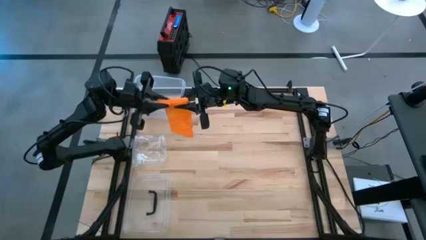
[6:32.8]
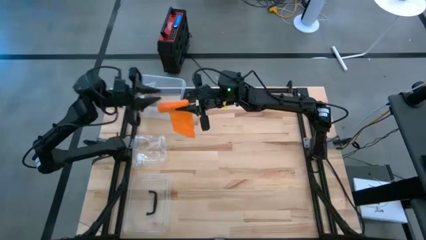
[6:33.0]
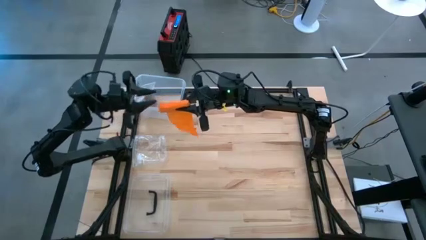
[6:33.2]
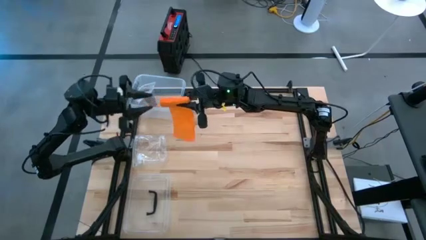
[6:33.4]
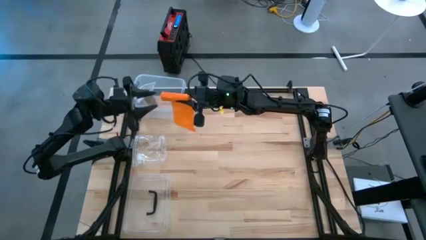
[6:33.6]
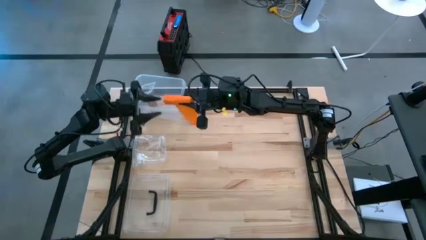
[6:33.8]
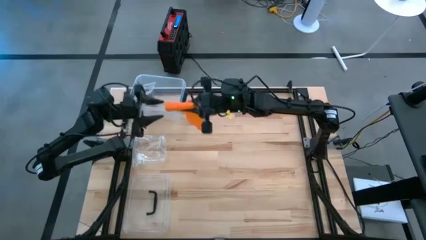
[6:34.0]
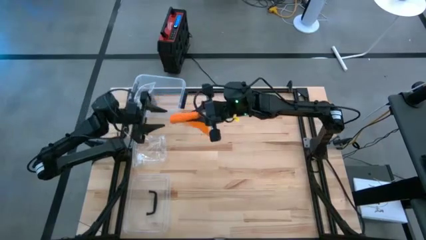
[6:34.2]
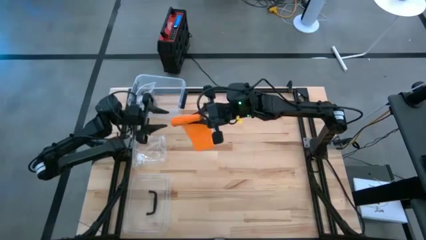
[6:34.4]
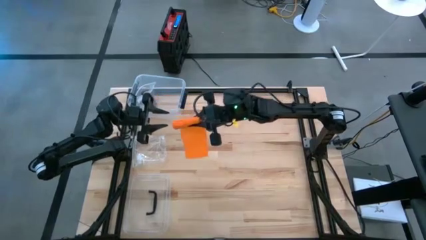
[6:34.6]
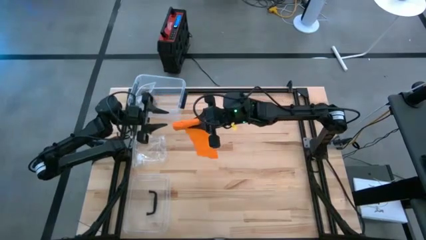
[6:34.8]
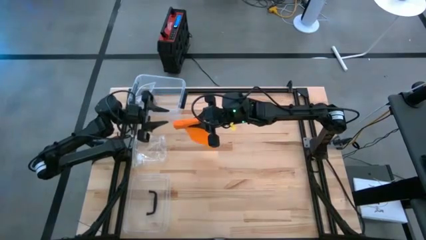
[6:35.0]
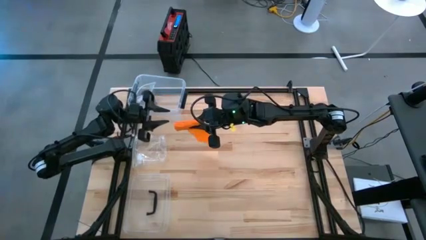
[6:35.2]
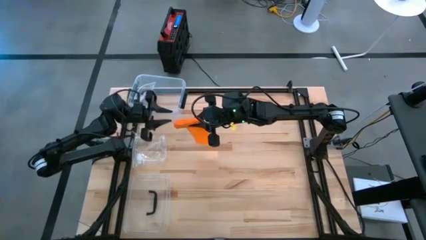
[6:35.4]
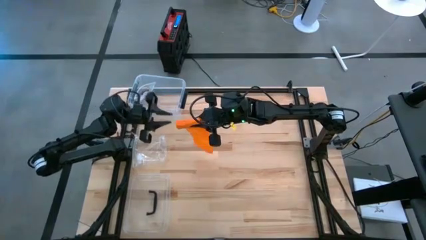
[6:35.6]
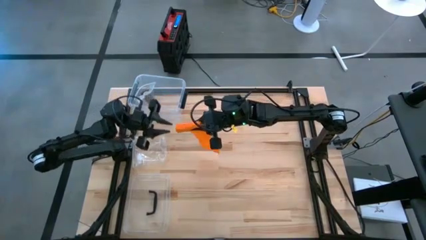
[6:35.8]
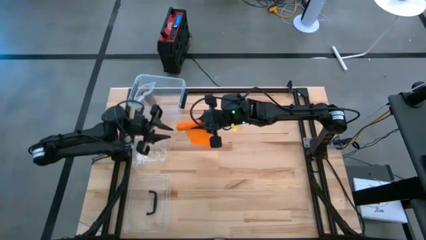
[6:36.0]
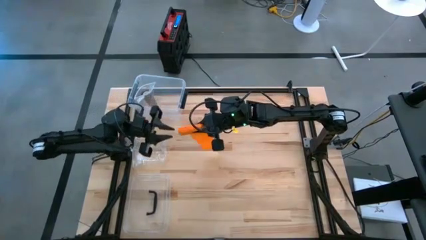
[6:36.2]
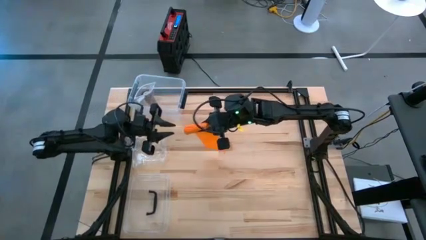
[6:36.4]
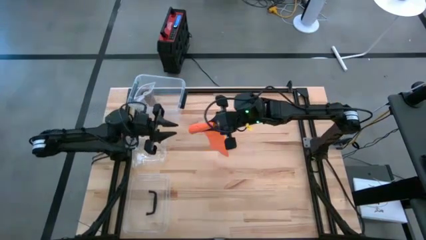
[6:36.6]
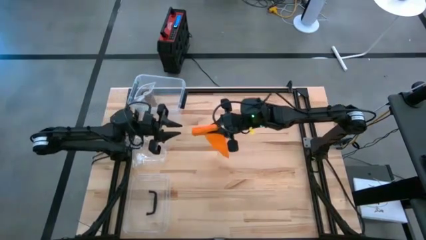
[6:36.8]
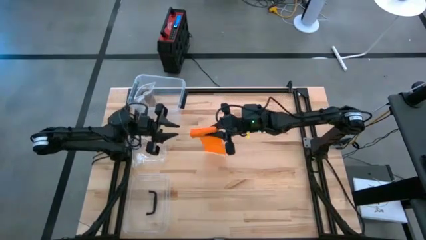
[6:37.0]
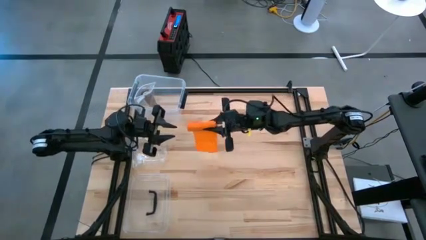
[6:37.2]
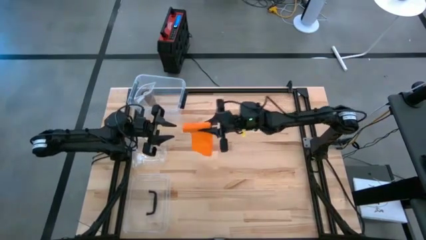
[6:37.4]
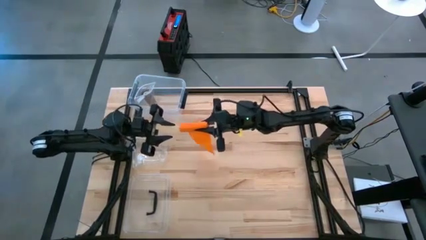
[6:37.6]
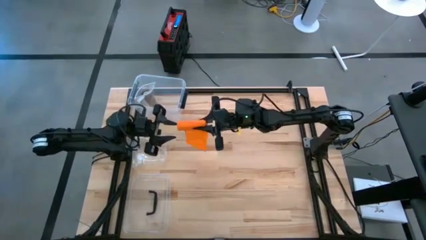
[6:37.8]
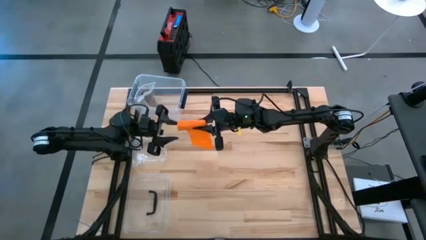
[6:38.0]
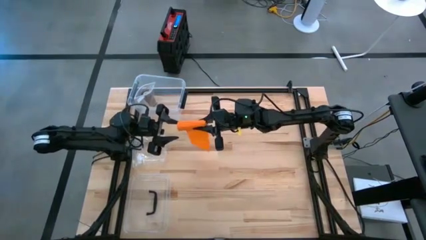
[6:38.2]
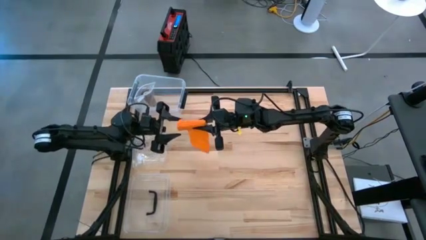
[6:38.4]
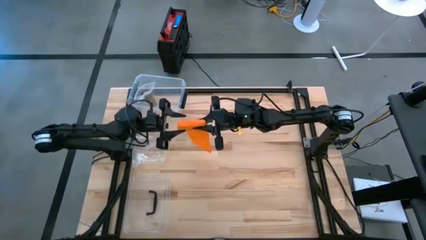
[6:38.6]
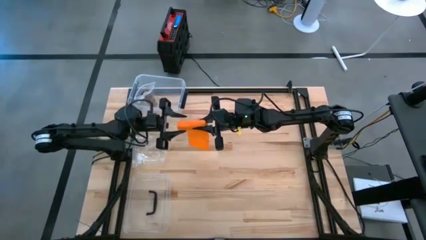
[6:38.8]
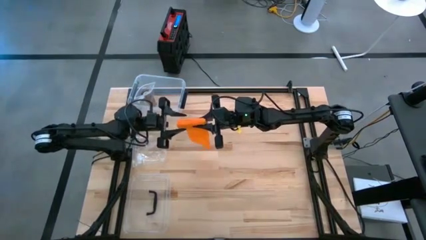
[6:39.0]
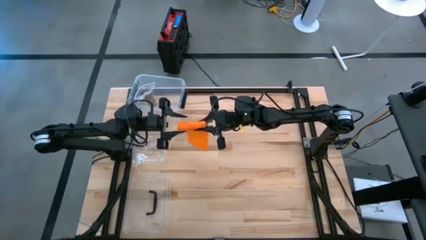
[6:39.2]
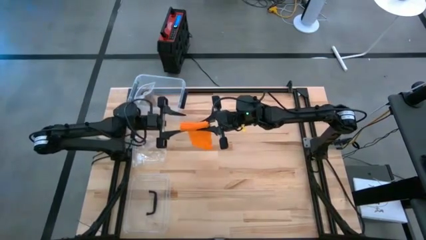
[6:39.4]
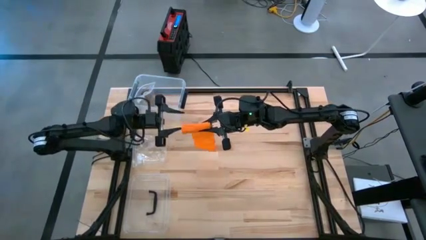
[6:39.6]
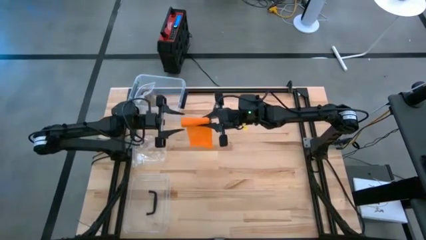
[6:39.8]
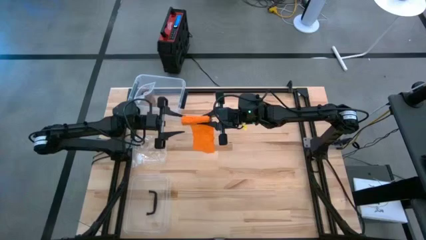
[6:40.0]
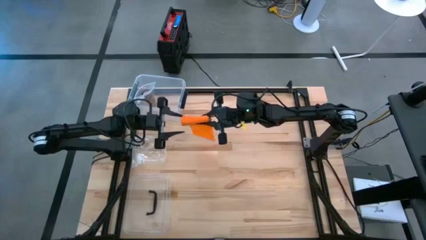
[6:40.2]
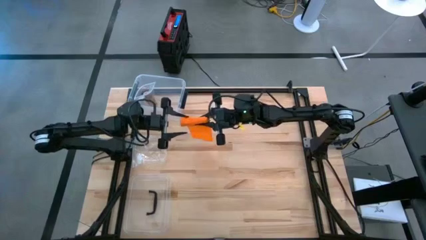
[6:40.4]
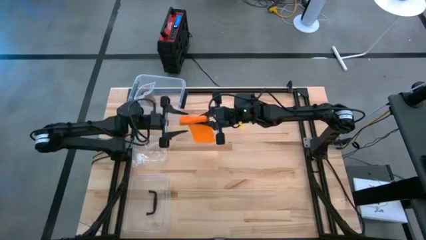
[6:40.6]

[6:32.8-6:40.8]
Task: Roll bandage
Roll the orange bandage

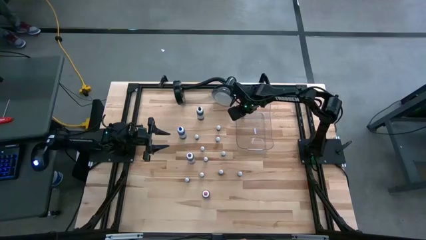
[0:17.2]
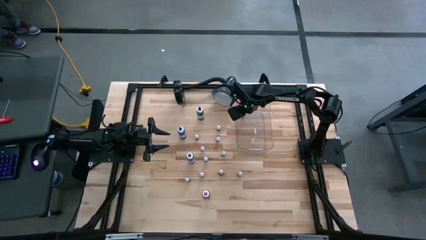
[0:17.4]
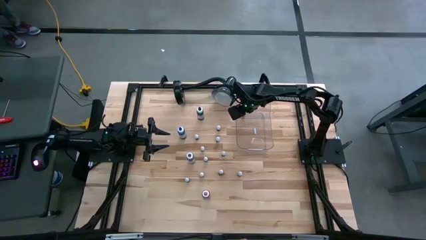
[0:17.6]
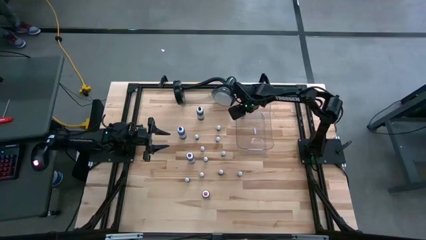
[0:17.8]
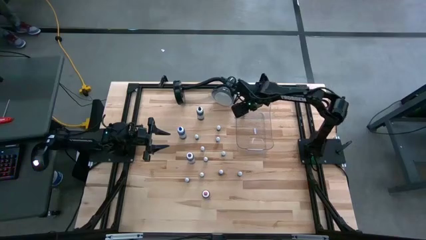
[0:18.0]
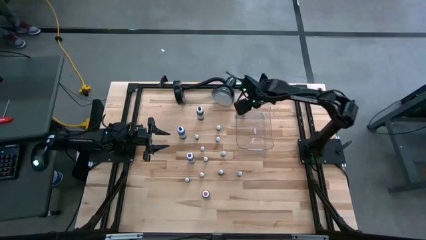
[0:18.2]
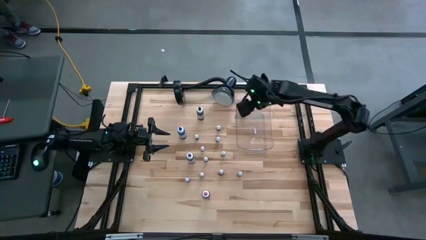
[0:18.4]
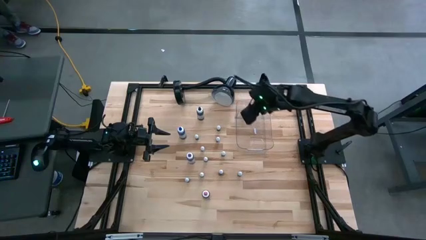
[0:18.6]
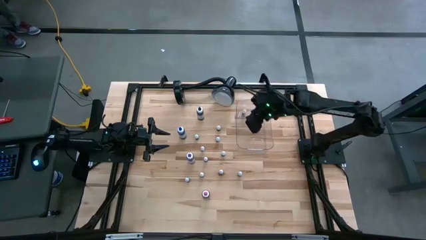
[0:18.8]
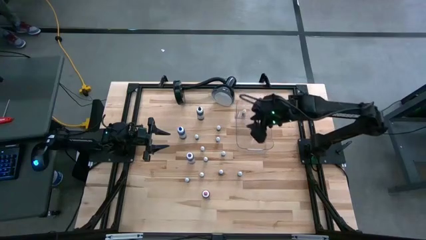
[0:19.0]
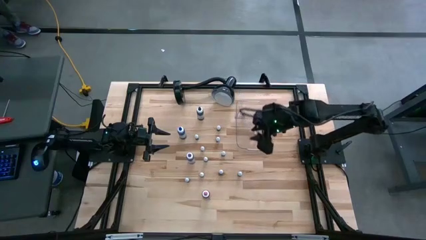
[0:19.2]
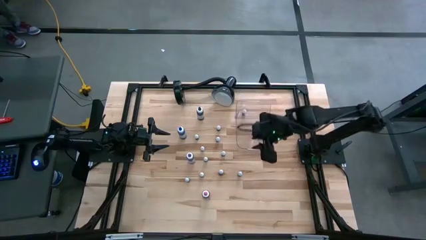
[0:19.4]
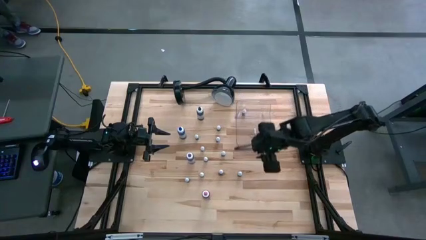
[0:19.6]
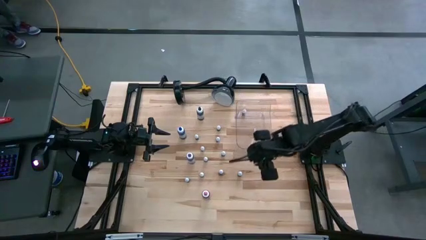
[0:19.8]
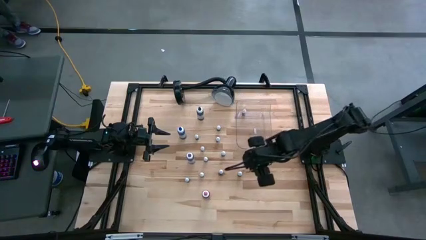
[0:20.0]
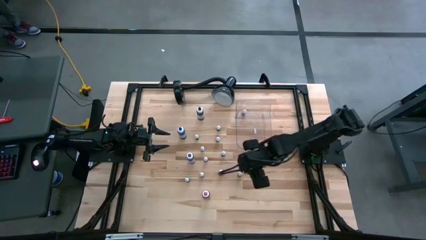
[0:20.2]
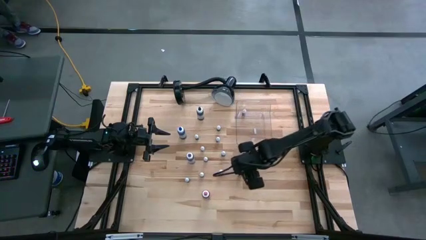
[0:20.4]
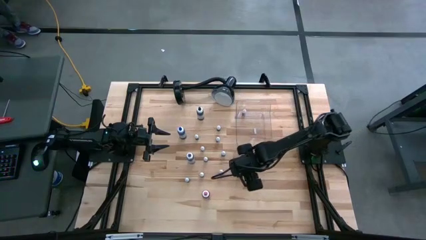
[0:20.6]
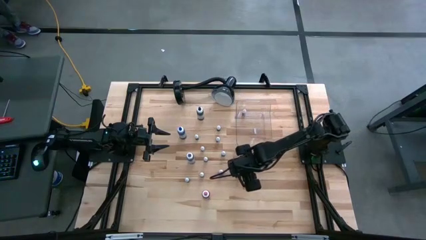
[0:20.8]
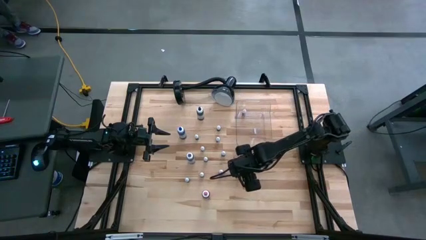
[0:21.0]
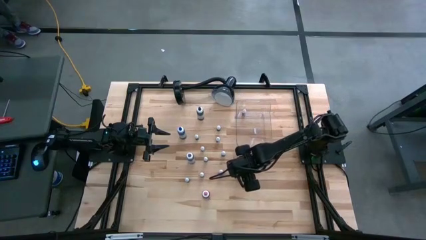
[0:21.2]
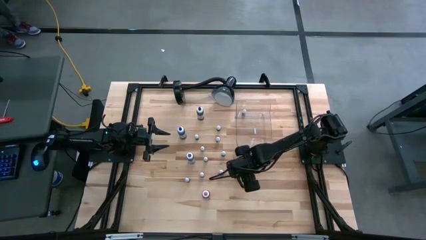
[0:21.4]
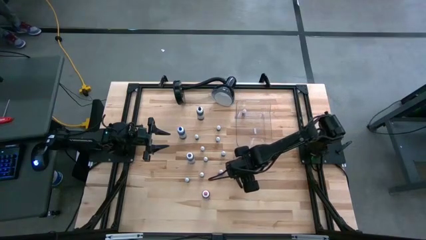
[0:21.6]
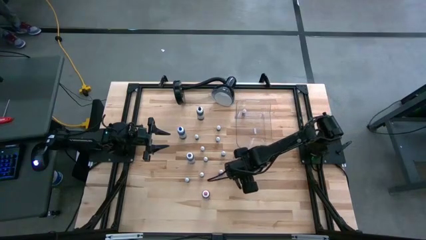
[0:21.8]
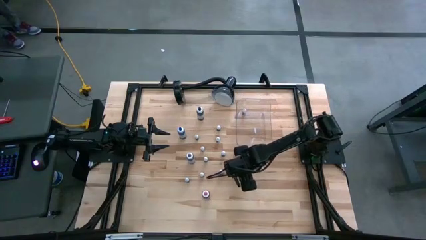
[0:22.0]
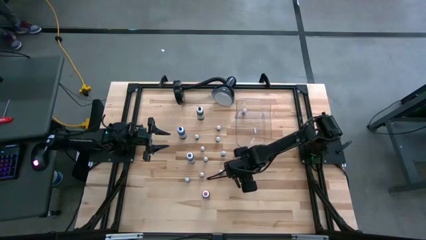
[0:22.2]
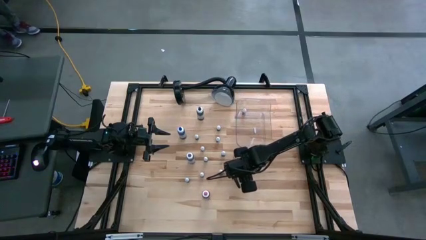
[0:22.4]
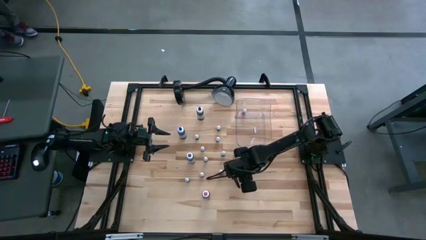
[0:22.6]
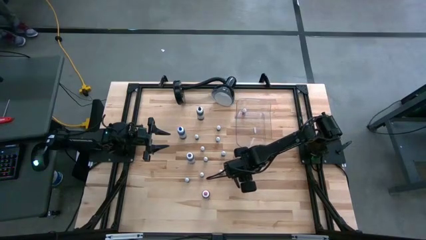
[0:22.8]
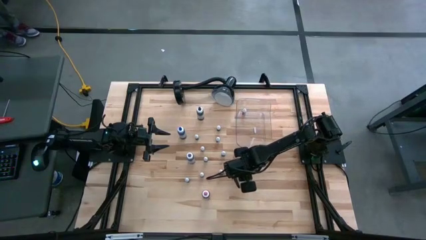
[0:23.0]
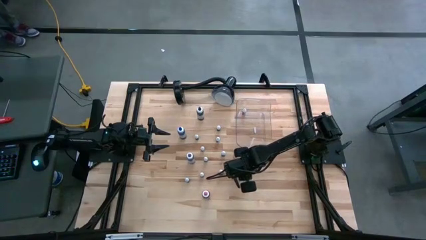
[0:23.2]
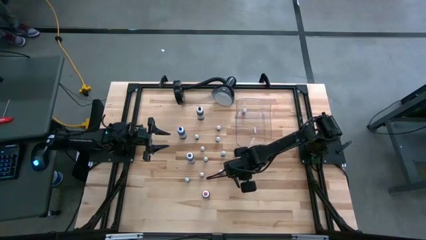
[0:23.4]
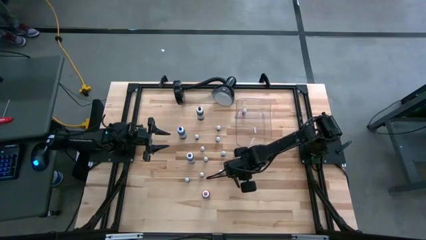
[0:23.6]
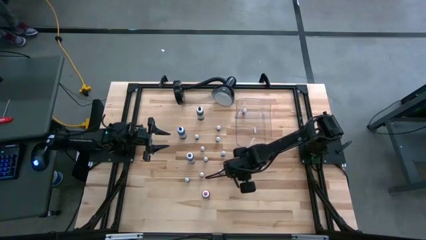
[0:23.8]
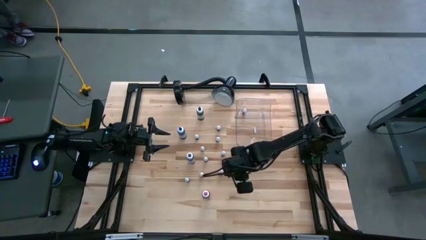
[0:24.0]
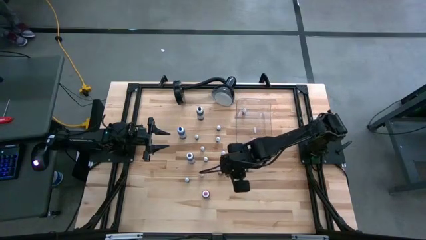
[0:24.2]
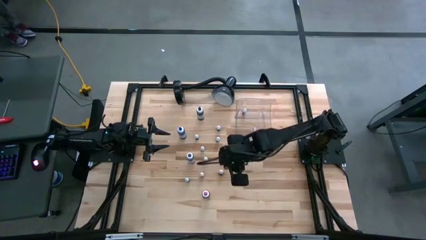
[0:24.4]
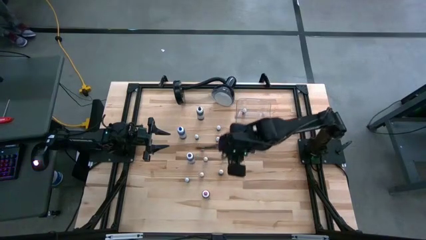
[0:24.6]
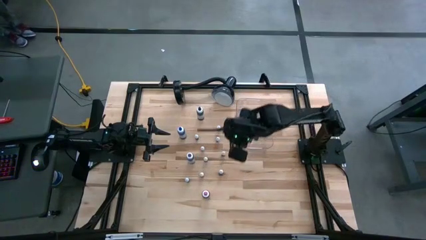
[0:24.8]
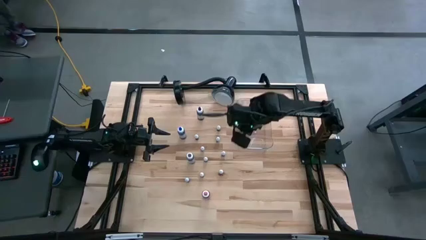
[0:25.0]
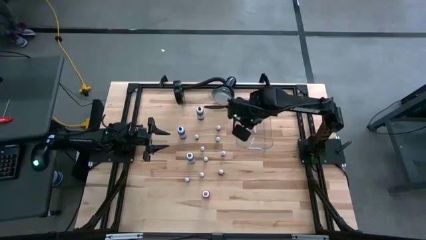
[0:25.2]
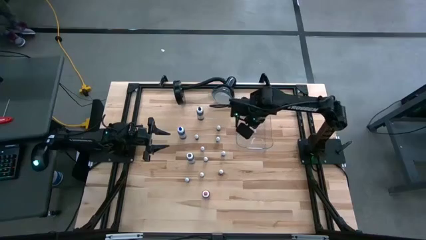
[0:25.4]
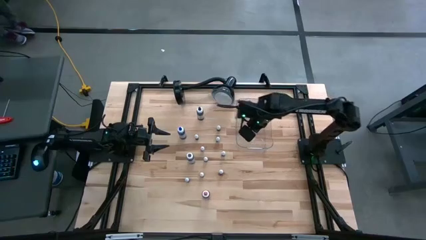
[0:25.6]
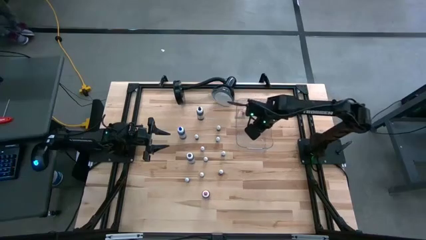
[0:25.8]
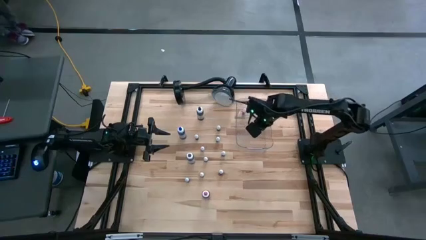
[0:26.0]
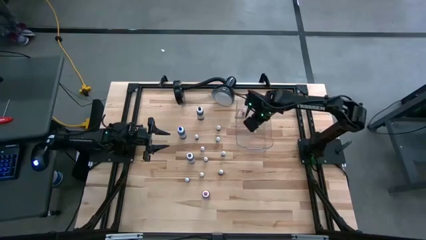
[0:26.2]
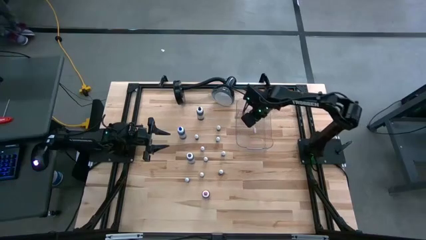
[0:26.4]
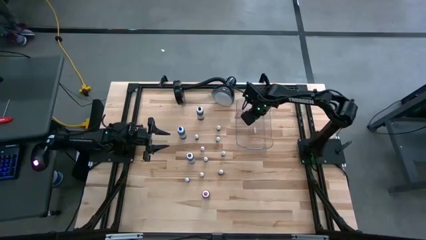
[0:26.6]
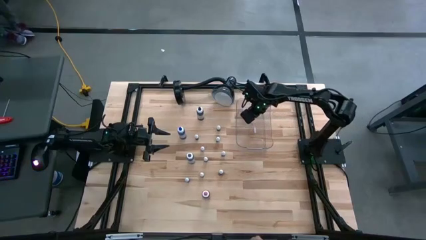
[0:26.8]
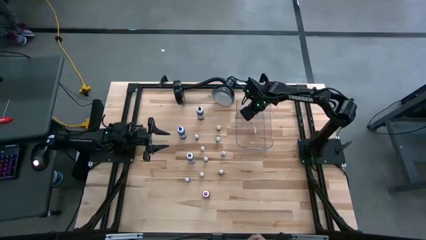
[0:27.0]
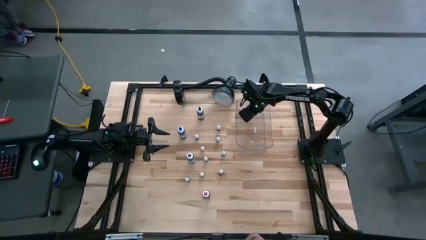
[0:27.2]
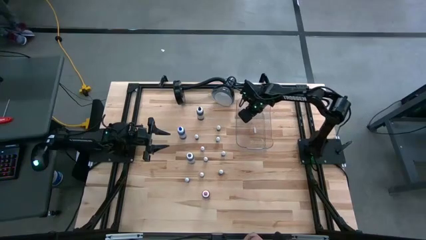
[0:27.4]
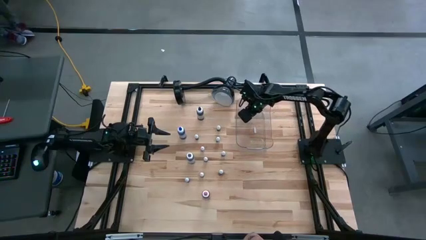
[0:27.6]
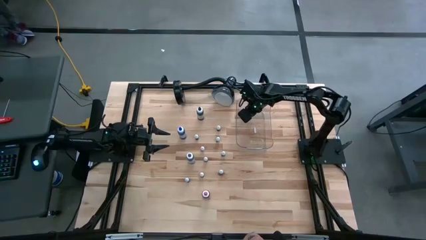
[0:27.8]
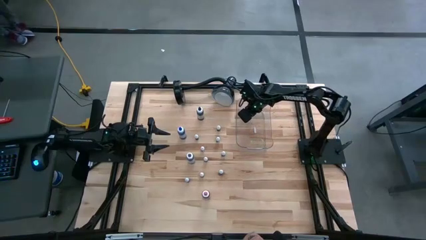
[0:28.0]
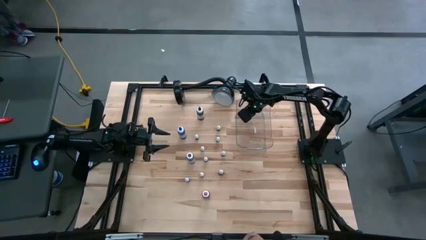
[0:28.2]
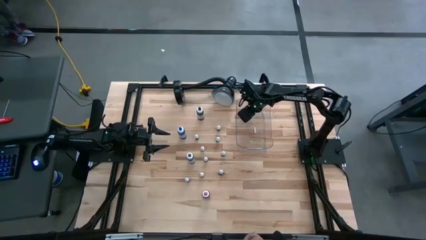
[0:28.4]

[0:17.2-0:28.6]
Task: Pick & Place food coloring
Put the small red food coloring bottle into the transparent bin
